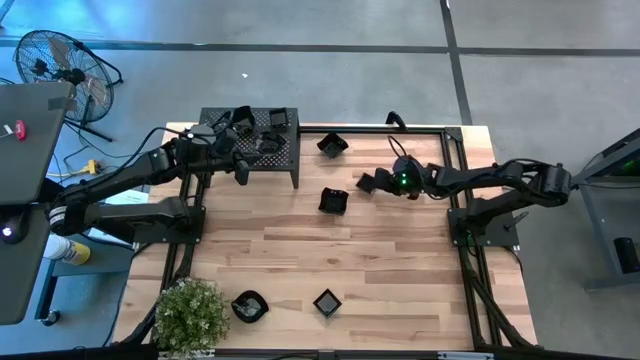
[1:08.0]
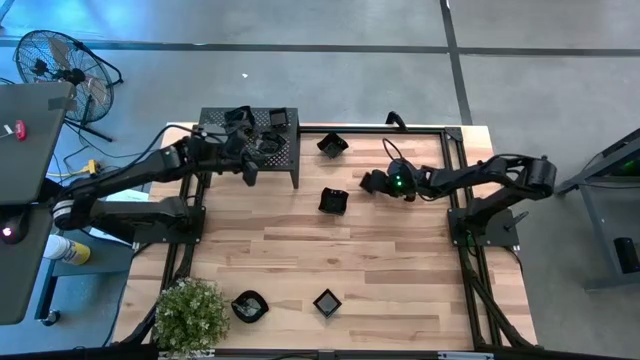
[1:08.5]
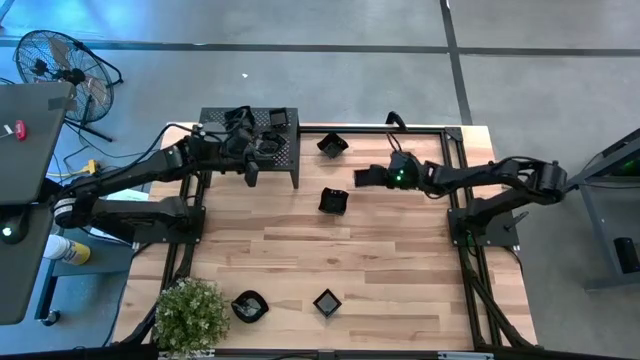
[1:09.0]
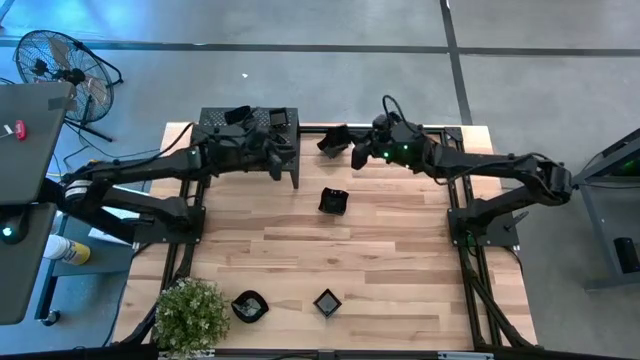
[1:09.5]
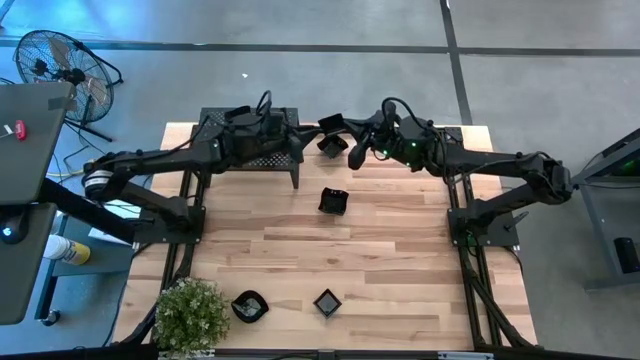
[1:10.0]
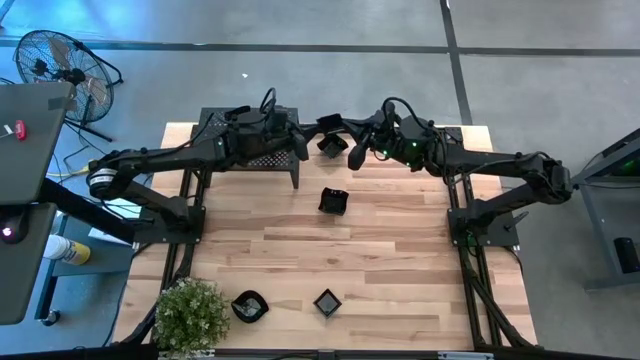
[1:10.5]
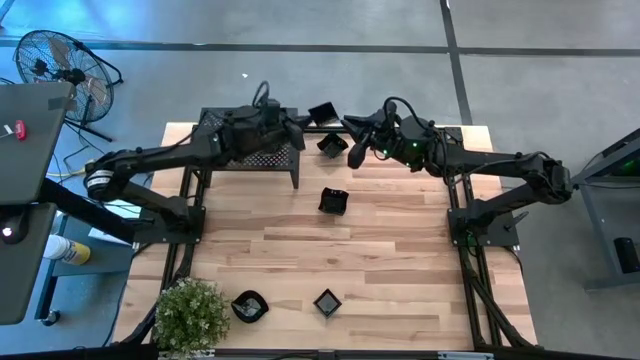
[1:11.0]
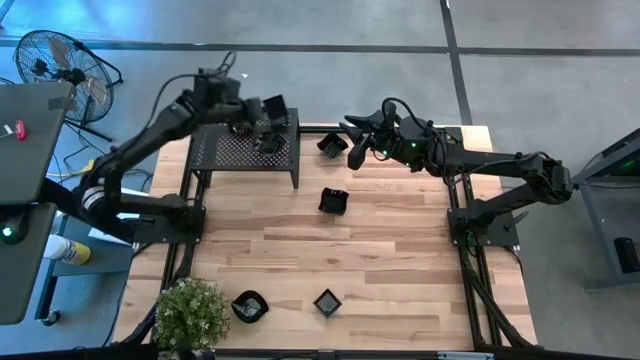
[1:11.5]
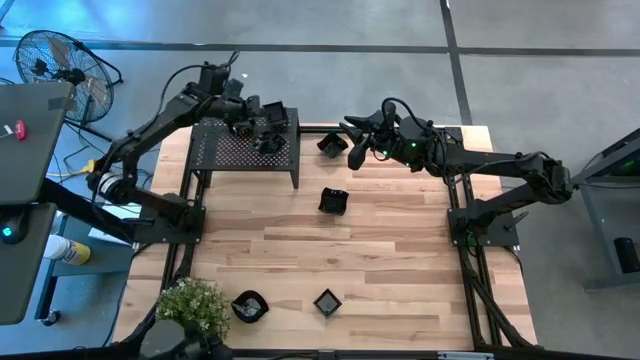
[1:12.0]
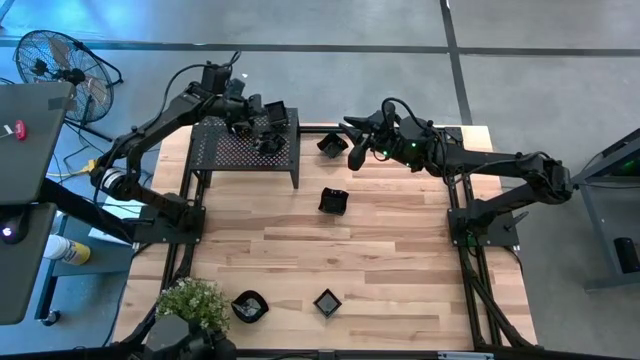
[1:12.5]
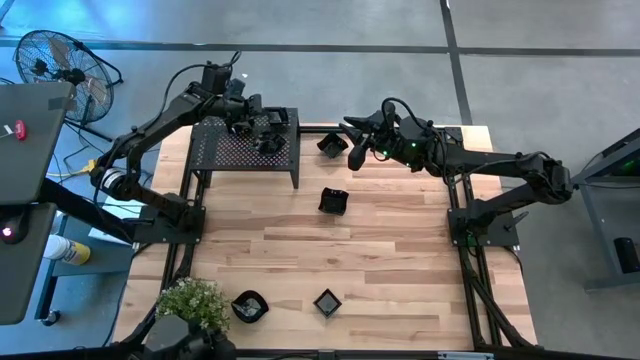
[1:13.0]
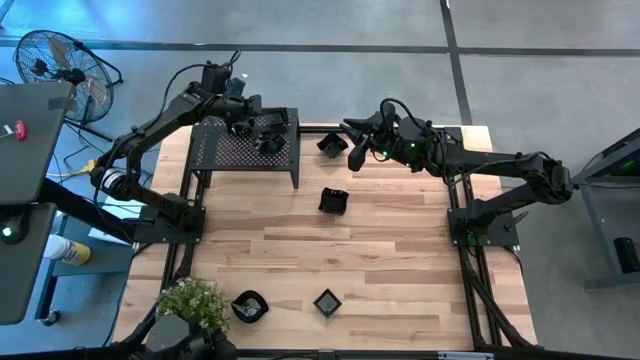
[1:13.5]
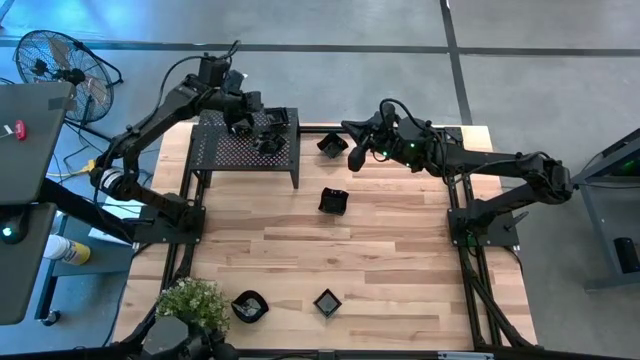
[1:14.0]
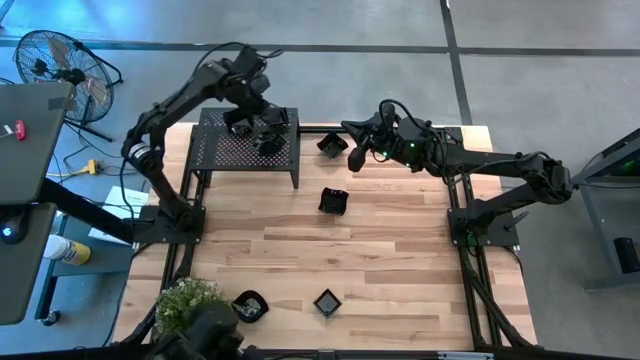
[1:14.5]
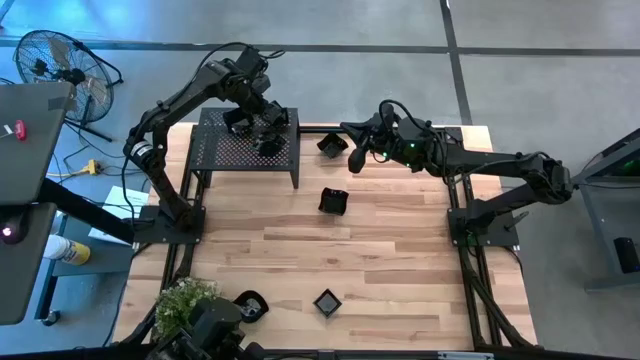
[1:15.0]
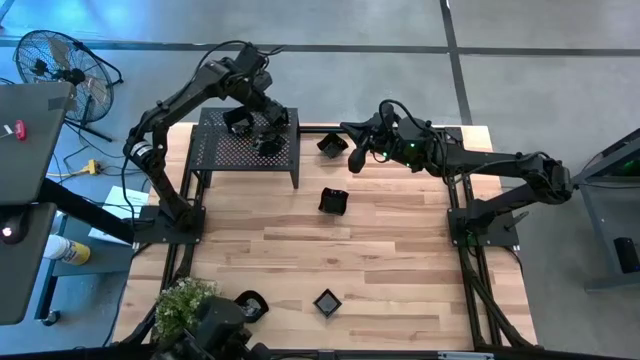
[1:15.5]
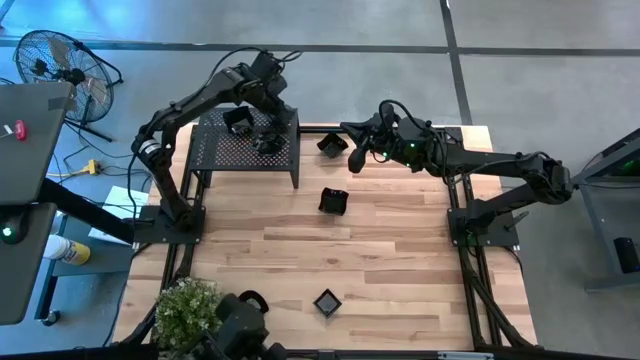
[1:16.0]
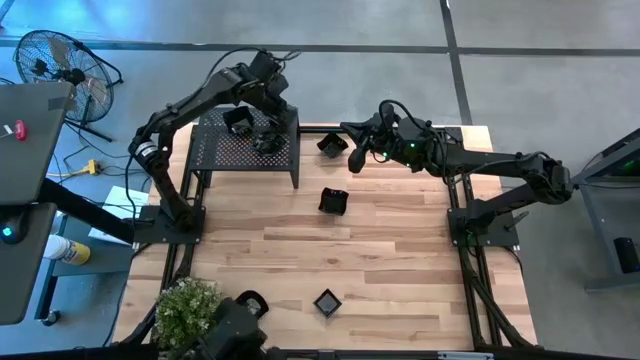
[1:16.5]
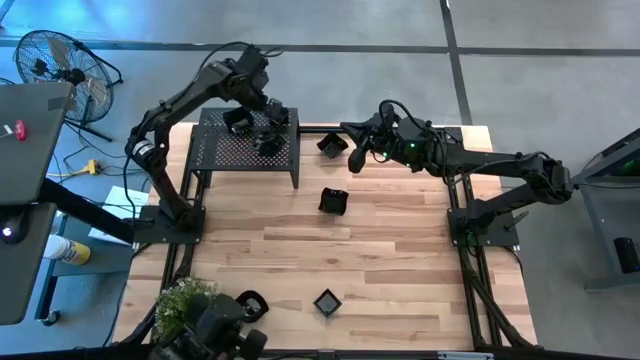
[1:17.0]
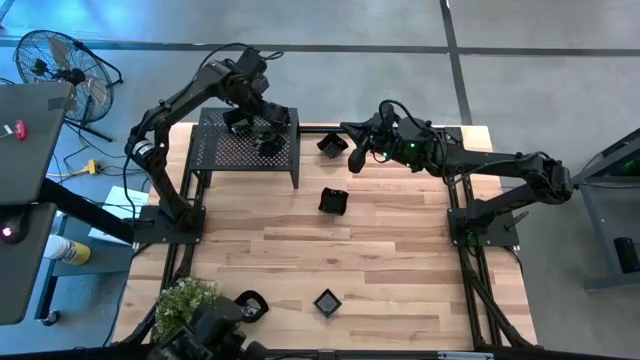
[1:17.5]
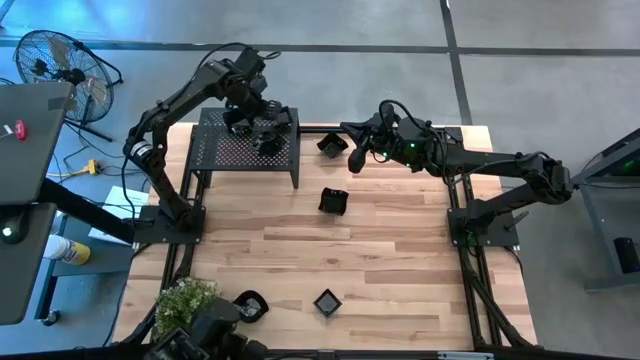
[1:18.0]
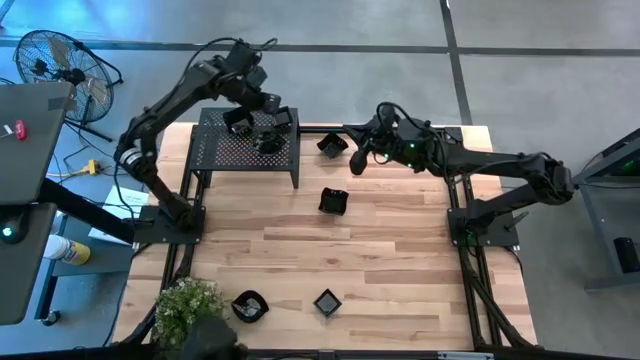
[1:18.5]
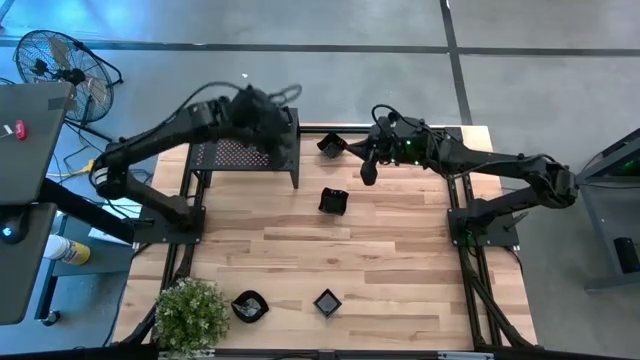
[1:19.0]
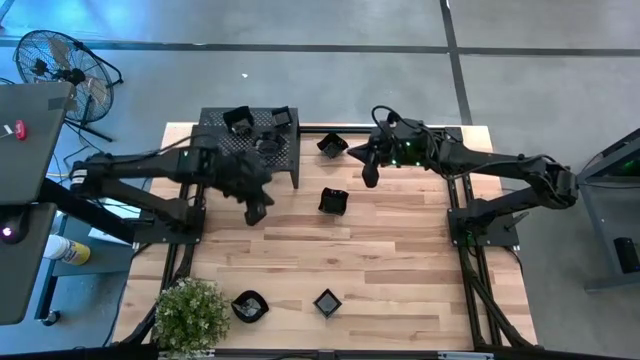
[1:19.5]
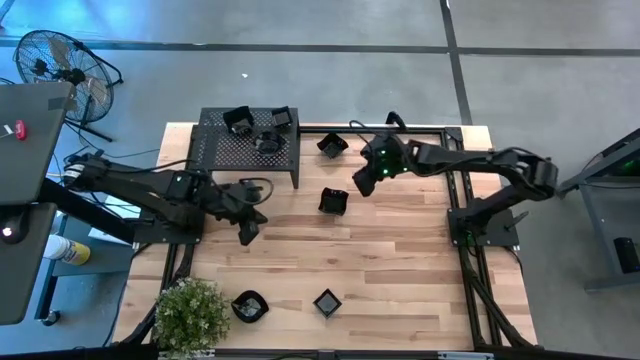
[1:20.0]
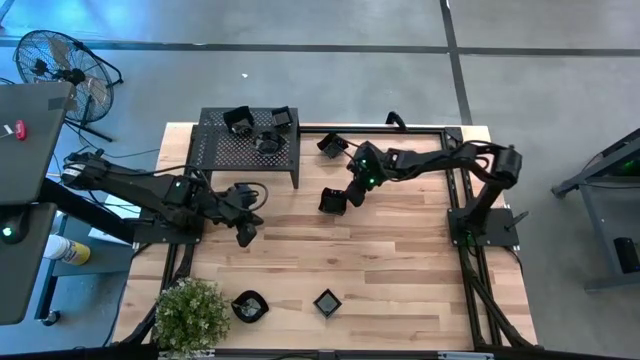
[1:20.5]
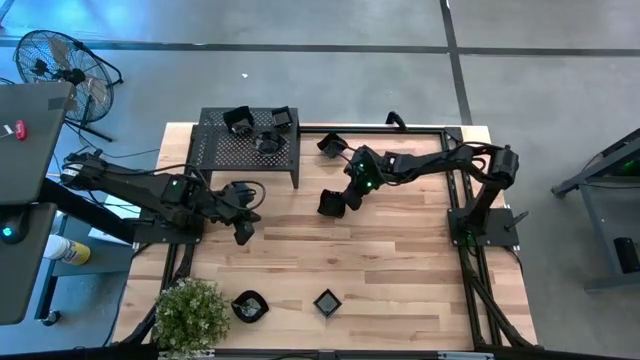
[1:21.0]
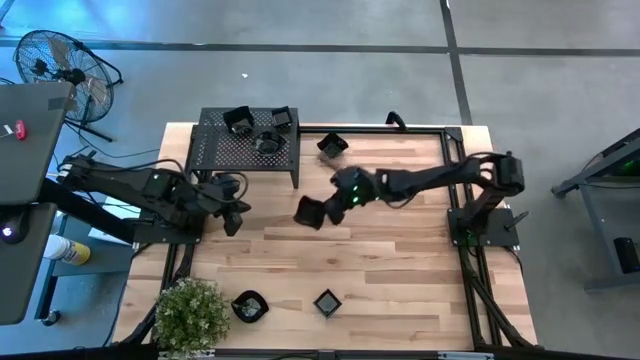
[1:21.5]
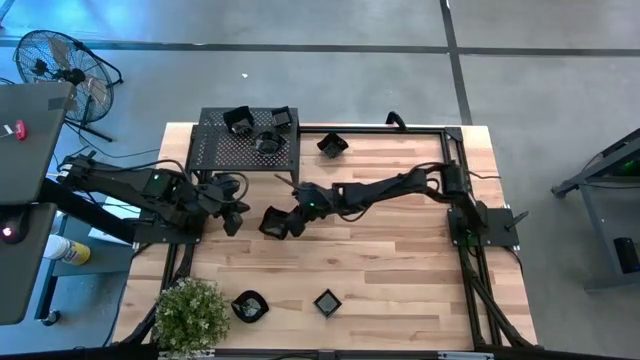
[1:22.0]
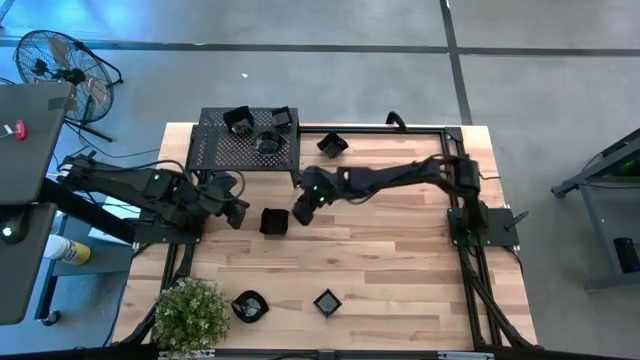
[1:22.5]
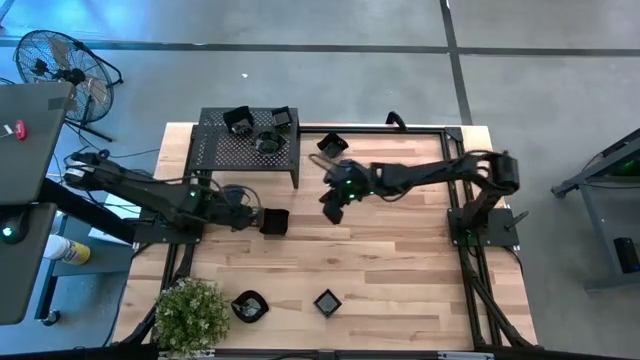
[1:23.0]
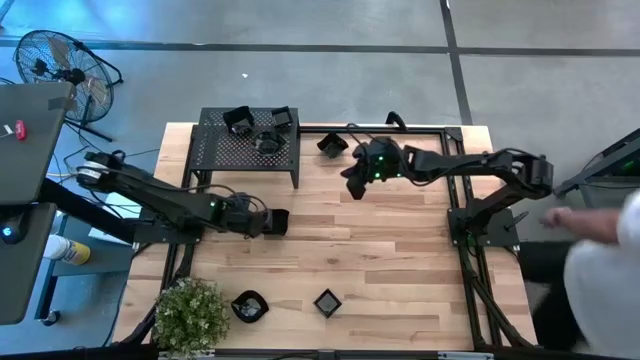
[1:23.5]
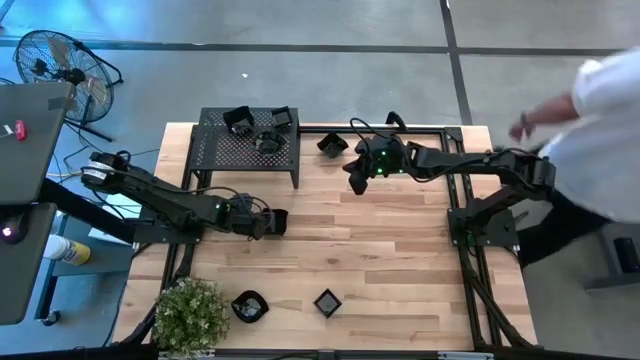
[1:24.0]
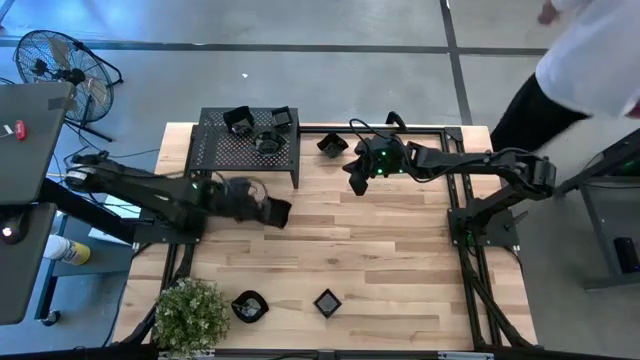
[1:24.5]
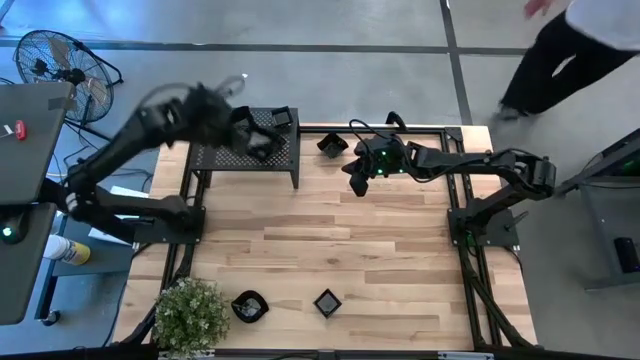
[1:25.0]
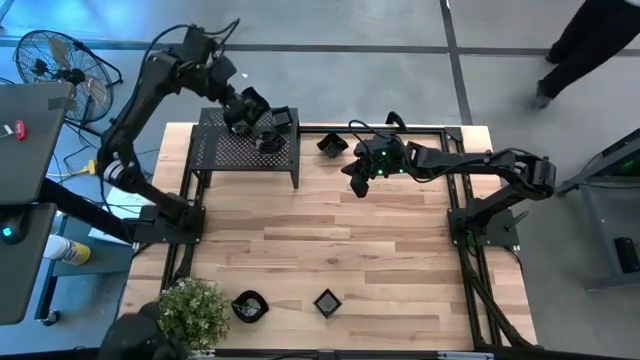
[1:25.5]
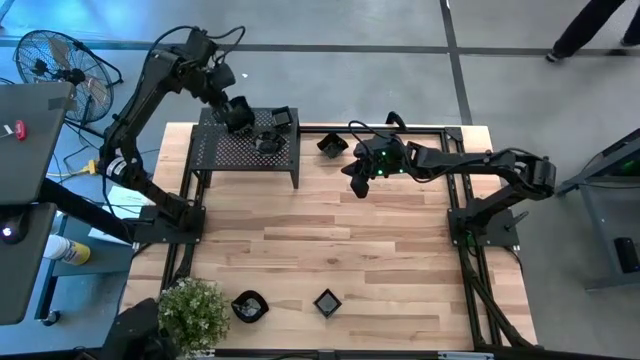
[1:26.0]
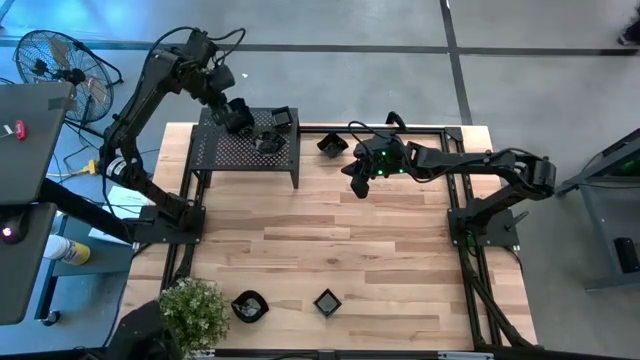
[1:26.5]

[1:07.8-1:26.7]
Task: Pick & Place Mini shaped plates
Stack the square plate on top of the other square plates on the shelf

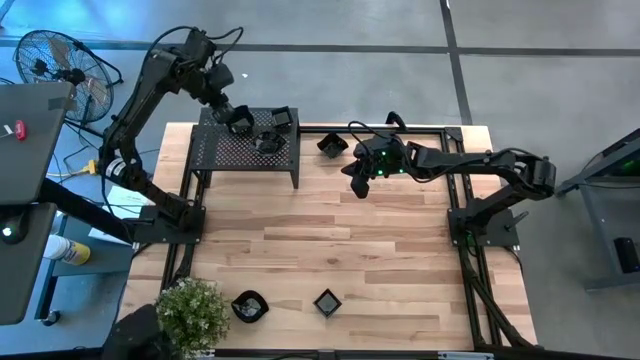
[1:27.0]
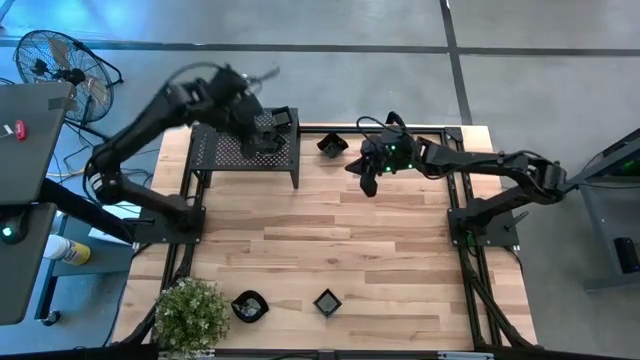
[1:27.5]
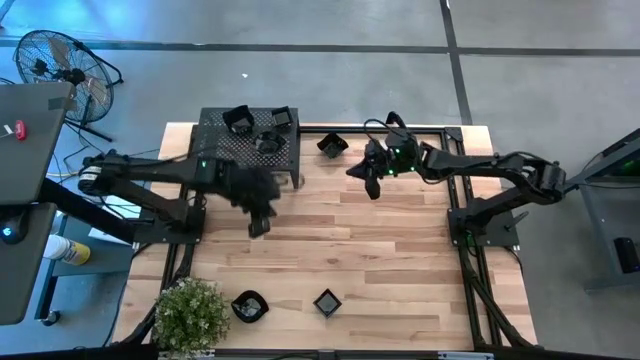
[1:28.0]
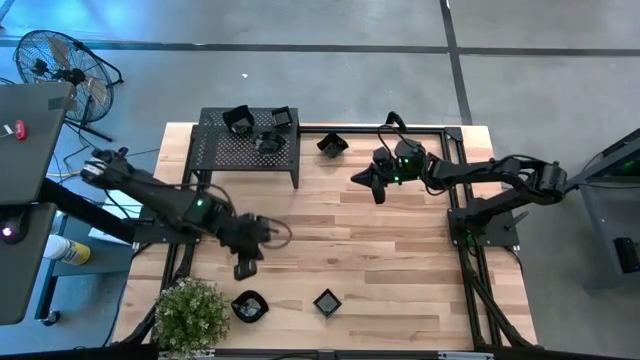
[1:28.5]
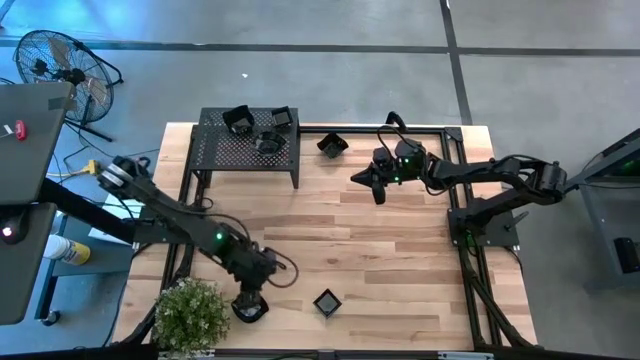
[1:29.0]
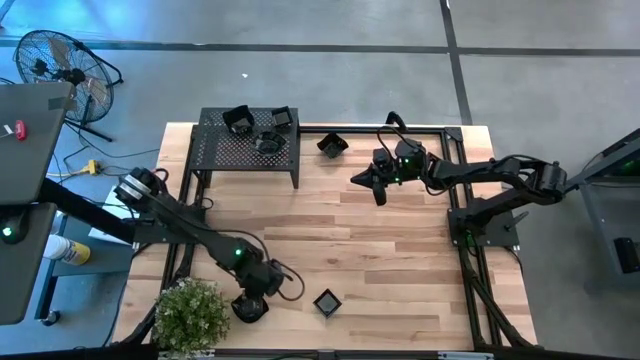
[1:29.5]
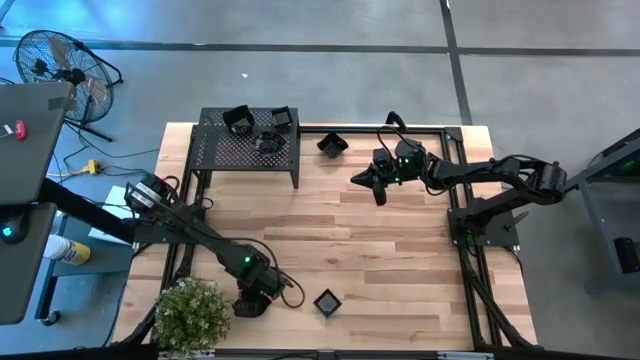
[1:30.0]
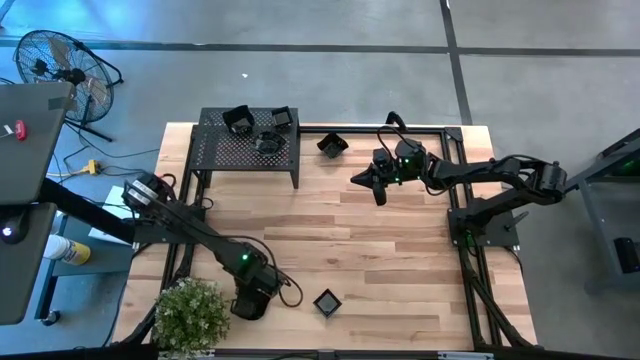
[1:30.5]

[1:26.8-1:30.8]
Stack the leaf-shaped plate on top of the other leaf-shaped plates on the shelf
